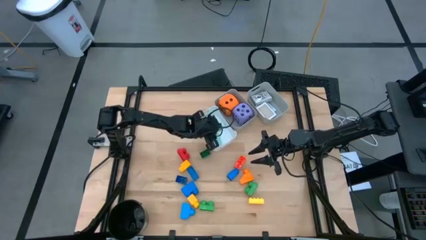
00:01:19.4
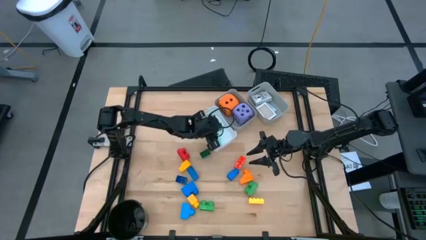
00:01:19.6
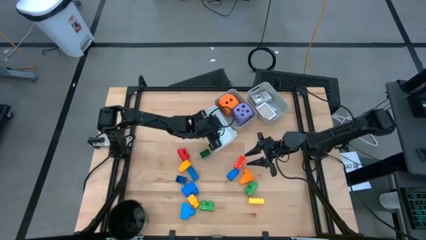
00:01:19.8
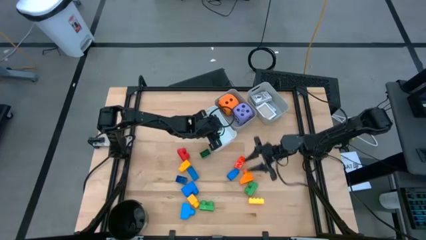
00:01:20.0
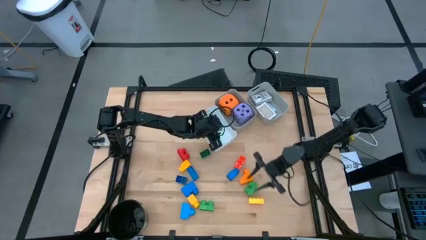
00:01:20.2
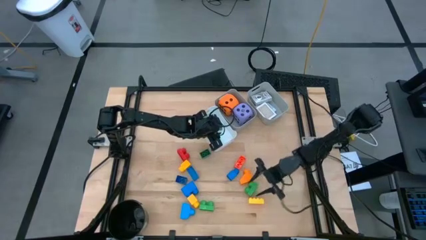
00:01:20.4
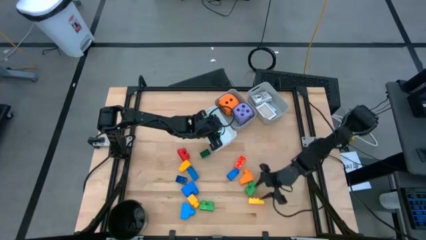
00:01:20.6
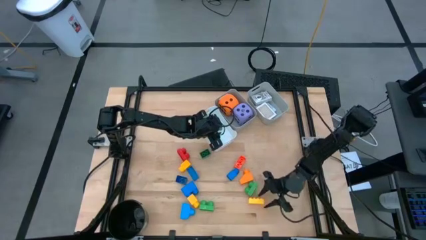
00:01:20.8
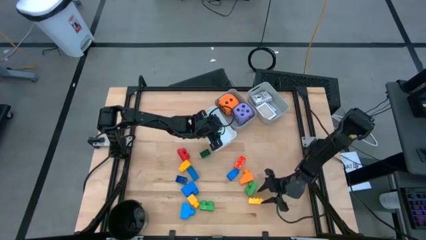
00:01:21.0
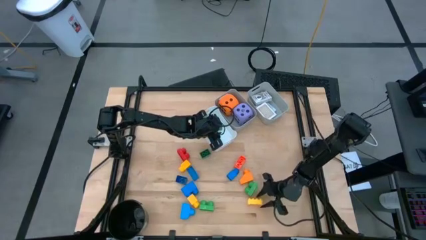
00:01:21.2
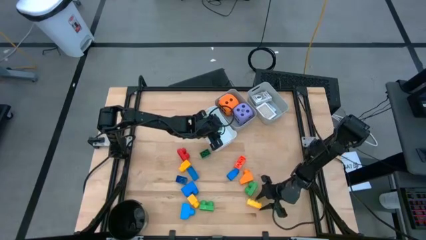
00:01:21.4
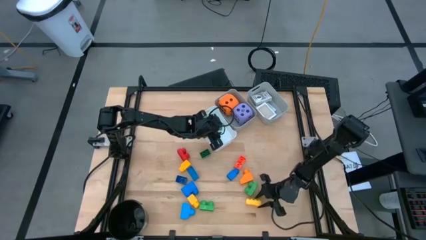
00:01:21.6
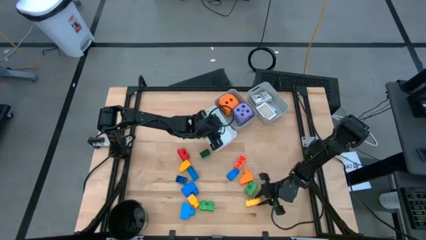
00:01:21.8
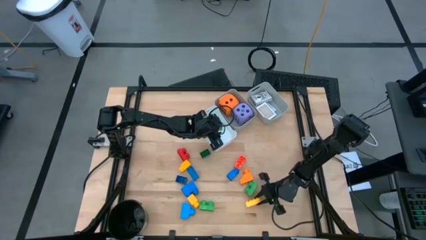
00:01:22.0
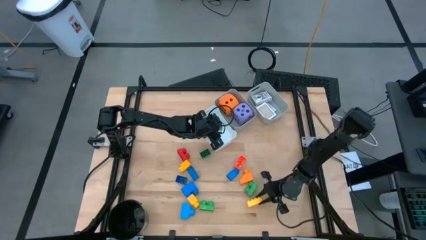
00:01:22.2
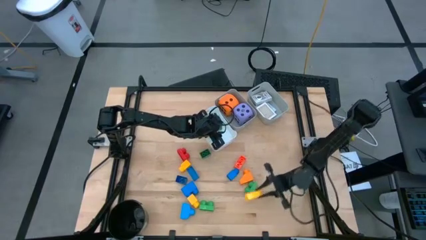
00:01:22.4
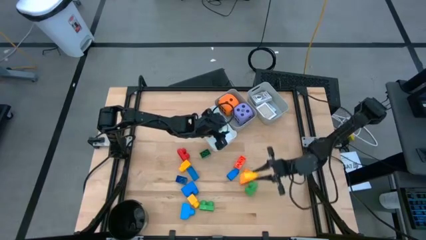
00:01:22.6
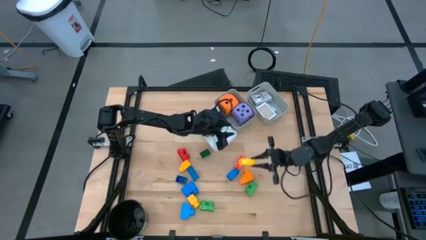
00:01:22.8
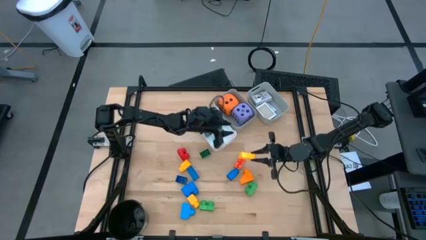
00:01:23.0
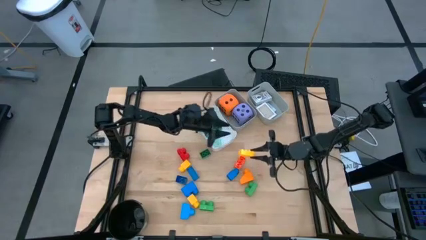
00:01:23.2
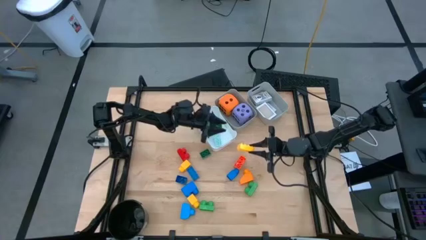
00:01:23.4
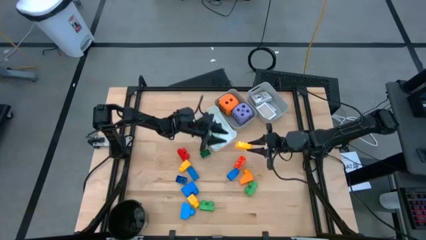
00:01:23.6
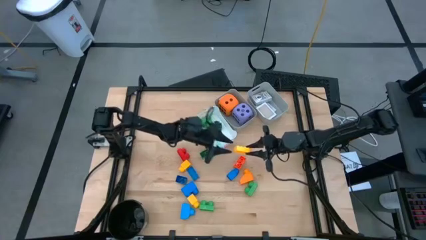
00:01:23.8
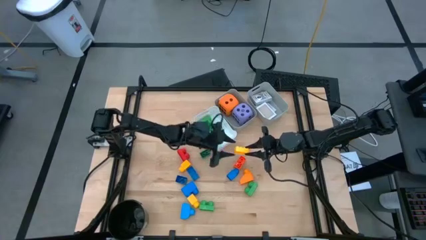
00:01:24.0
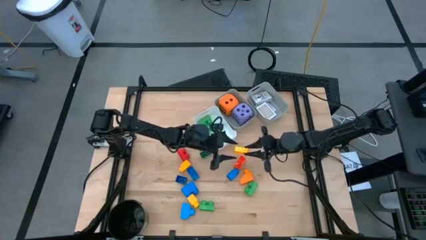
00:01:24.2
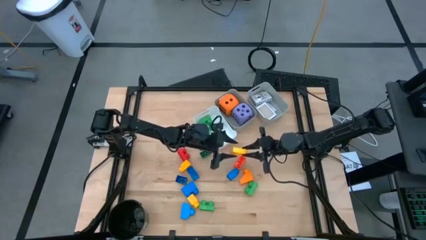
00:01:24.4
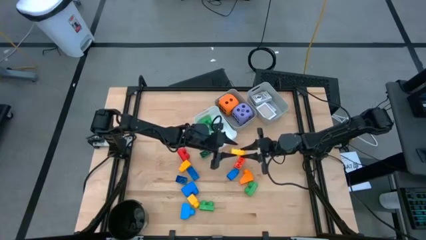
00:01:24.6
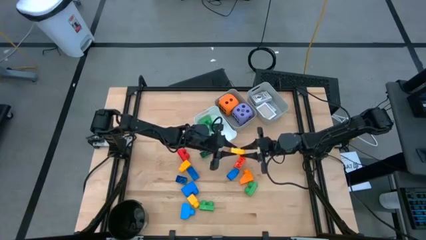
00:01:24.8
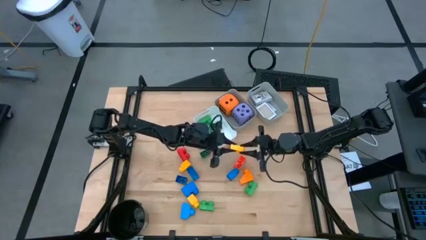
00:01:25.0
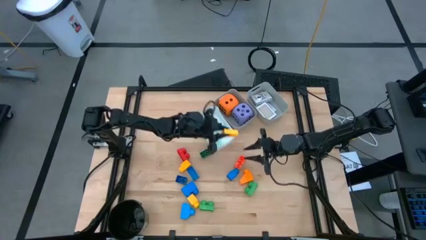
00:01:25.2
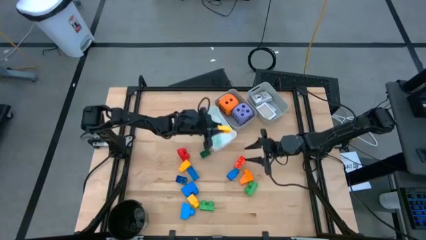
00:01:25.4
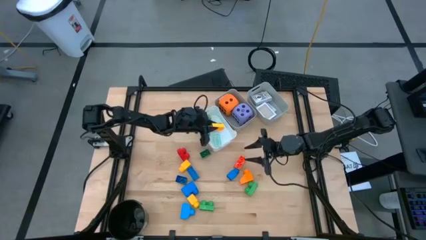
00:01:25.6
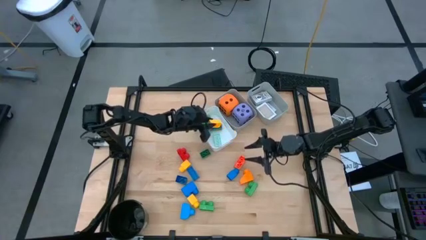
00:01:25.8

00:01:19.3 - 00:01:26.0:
Task: Pick & Place Toys
Put the yellow game piece into the white bin

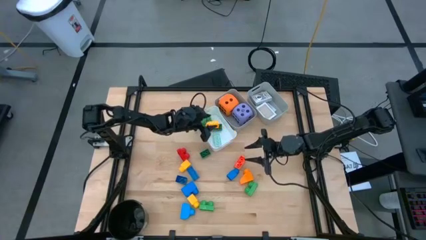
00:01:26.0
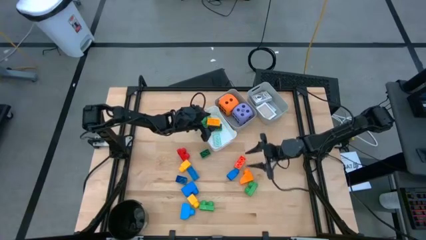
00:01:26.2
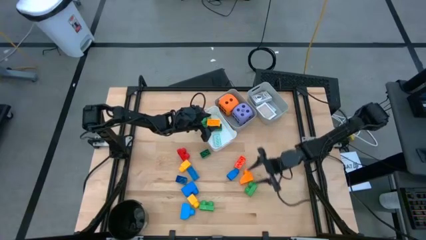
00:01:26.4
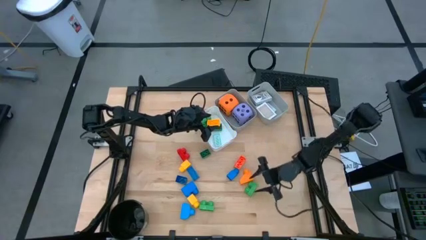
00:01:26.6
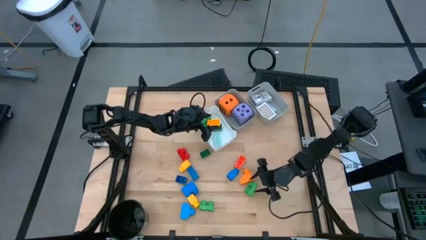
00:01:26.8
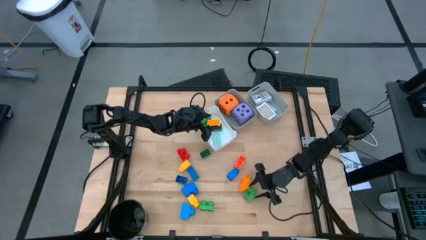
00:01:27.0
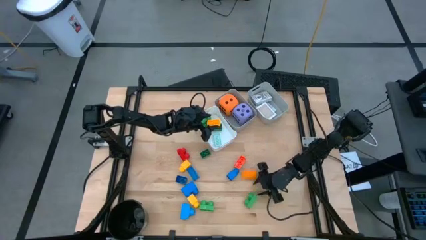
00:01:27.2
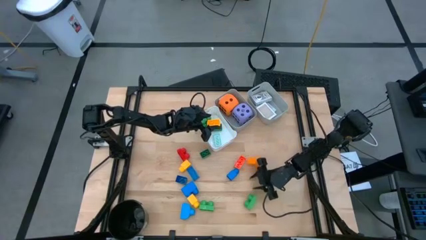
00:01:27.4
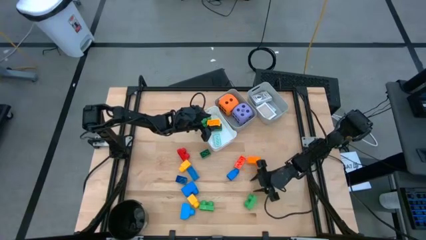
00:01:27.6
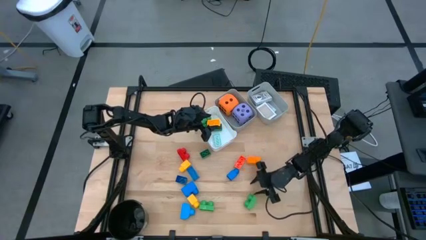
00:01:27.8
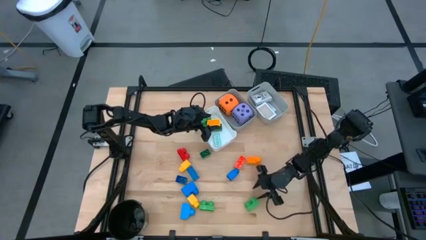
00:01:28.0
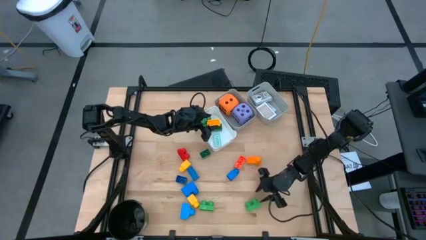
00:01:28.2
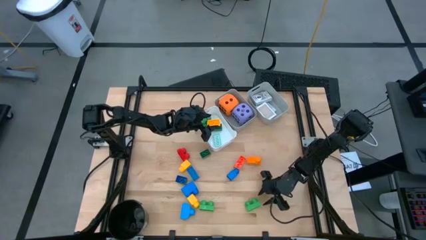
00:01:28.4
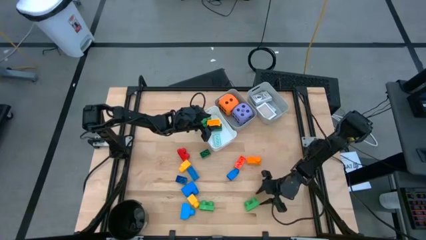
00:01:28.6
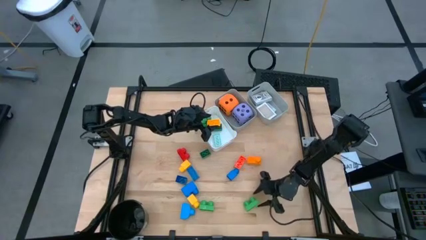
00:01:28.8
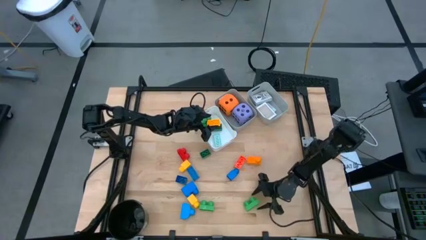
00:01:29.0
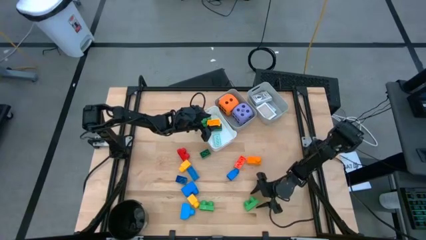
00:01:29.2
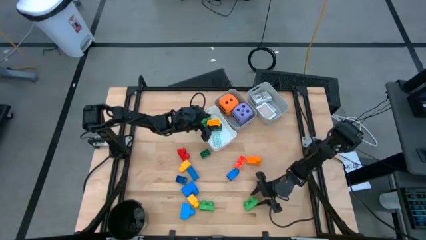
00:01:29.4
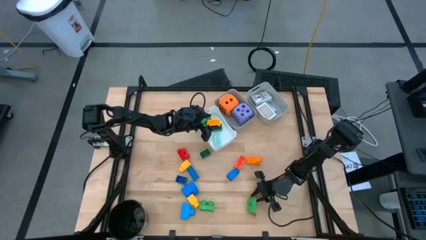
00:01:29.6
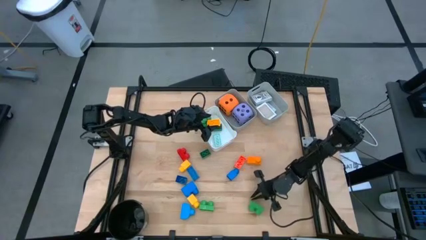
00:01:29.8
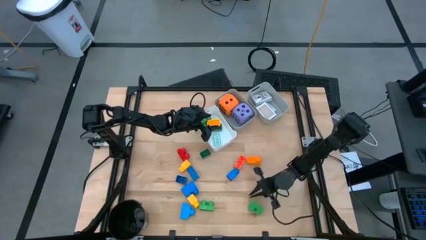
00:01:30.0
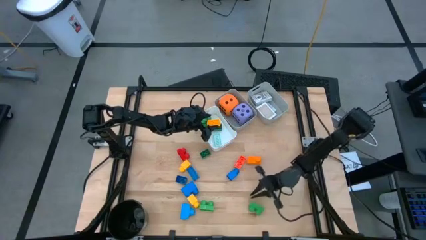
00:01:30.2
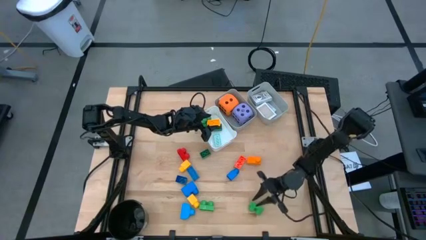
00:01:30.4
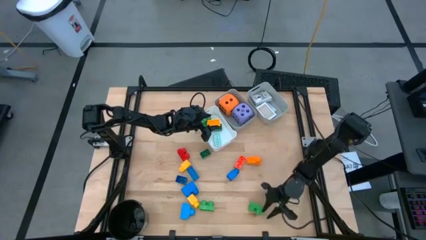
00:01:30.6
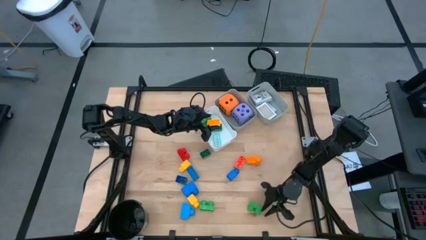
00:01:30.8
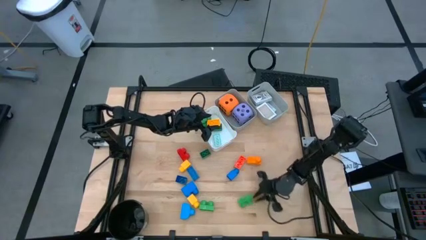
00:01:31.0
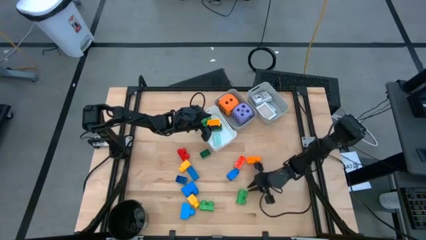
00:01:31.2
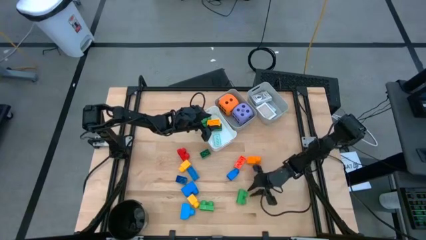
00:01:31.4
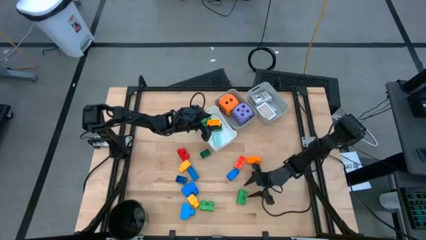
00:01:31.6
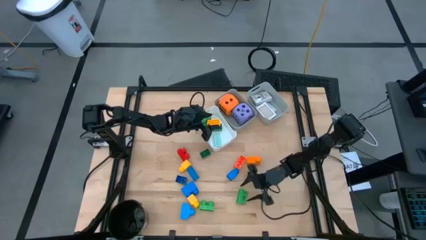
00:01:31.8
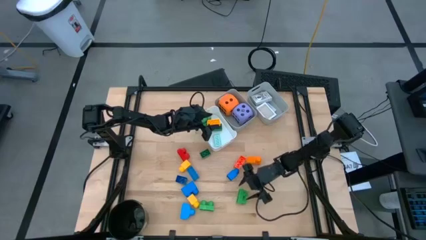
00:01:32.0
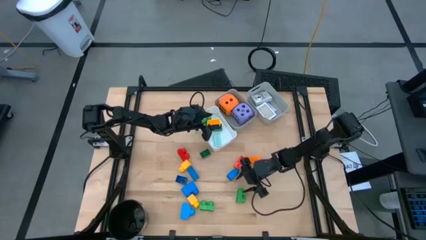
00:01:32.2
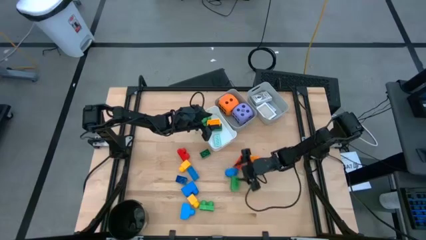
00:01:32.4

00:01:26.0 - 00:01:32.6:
Put the green game piece into the white bin

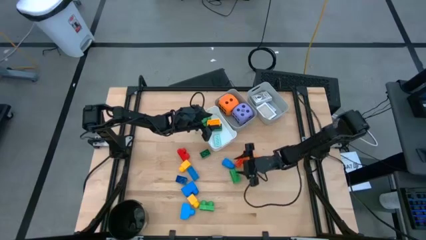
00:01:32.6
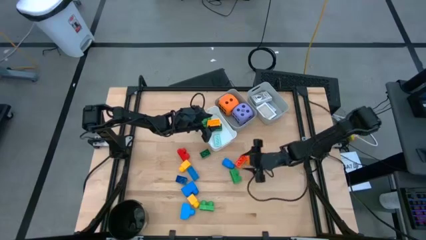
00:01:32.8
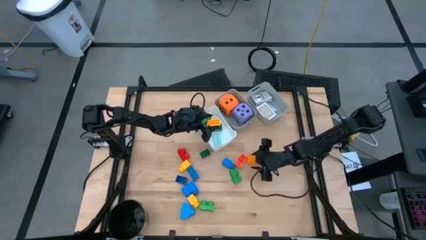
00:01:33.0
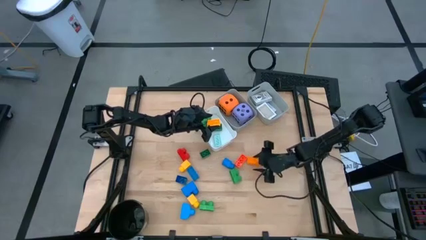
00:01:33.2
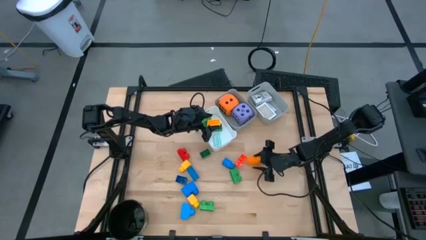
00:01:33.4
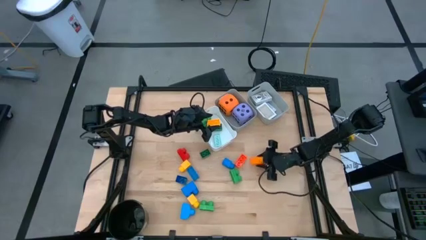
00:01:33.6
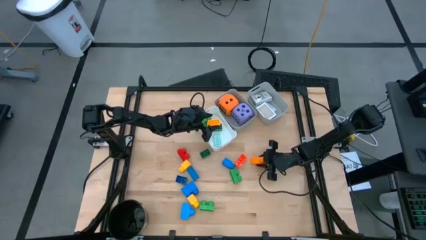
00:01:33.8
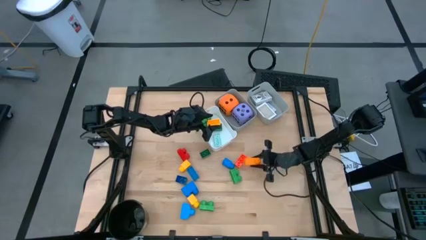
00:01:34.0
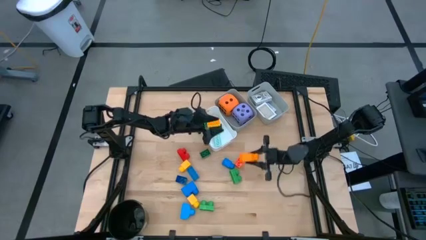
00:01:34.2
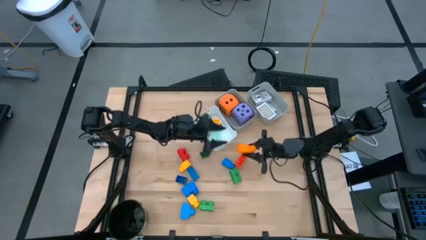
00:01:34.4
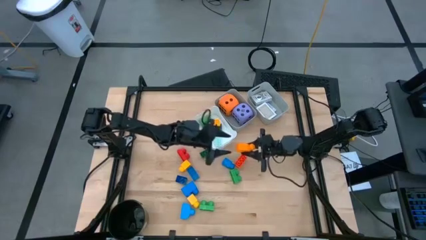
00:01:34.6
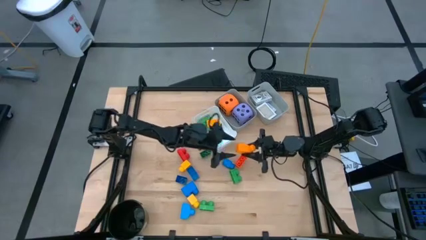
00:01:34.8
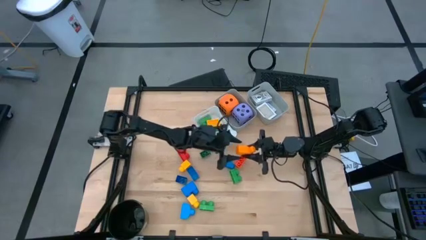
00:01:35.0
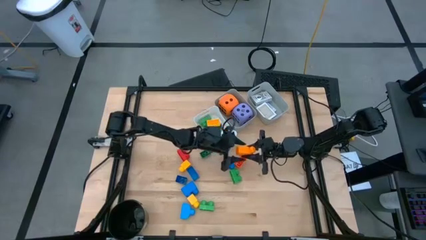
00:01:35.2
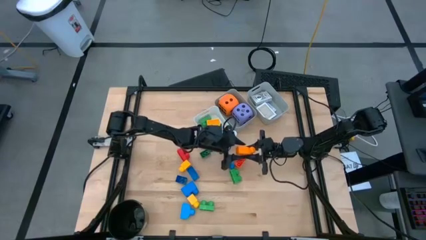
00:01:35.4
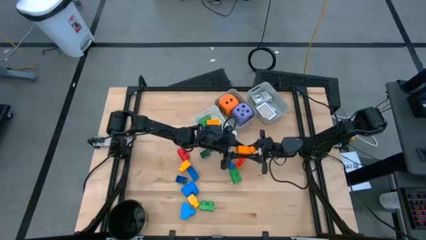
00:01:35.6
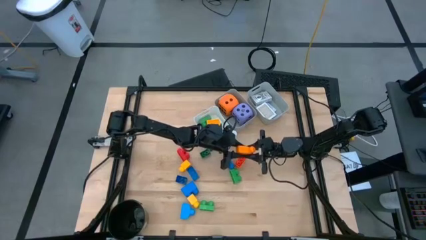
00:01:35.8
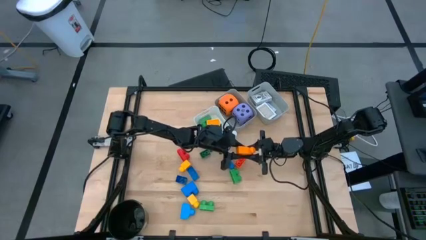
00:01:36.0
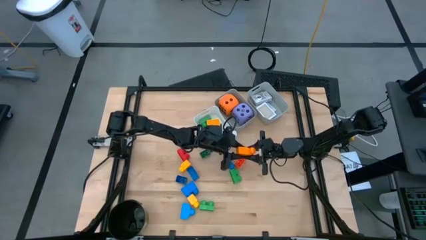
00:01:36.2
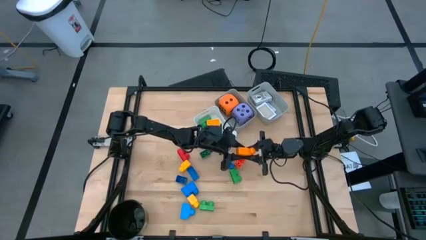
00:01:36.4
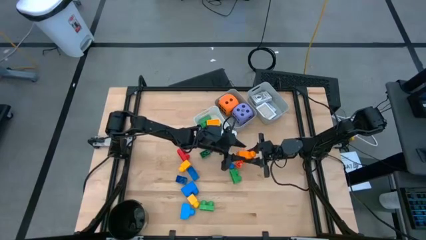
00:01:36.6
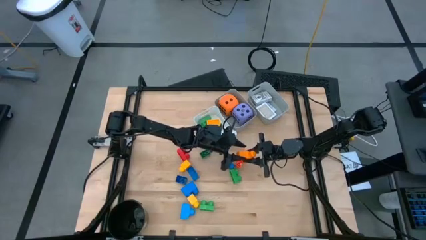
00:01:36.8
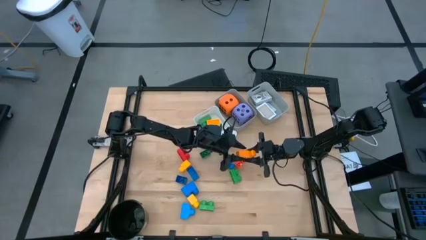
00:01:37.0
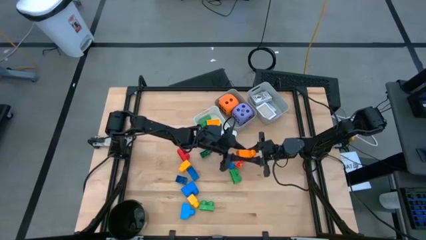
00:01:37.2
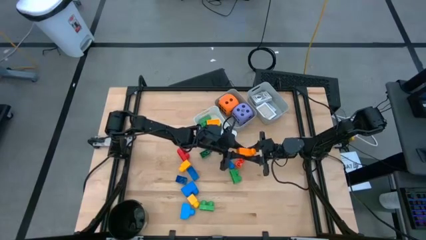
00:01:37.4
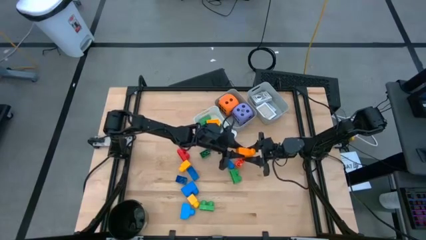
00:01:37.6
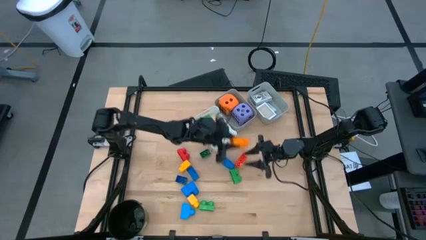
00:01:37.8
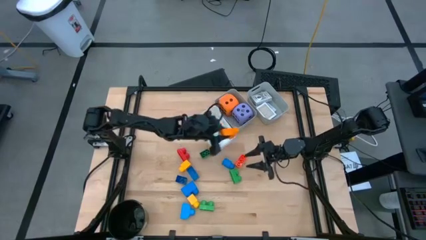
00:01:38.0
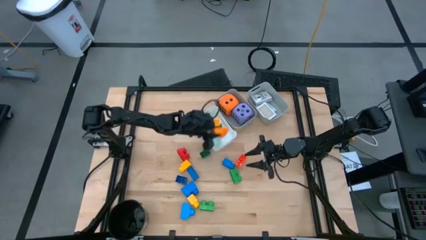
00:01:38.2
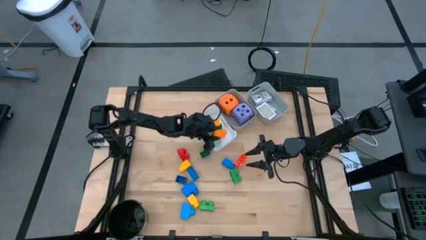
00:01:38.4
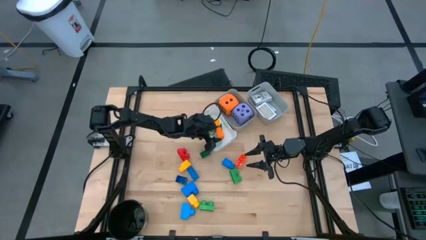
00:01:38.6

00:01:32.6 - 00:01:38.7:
Put the orange game piece into the white bin
